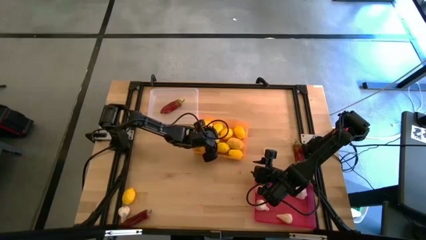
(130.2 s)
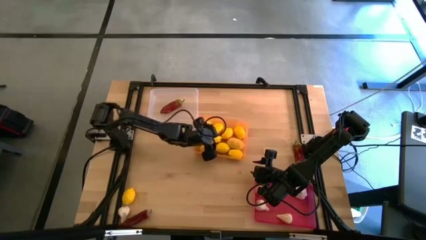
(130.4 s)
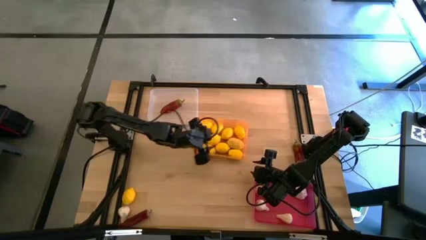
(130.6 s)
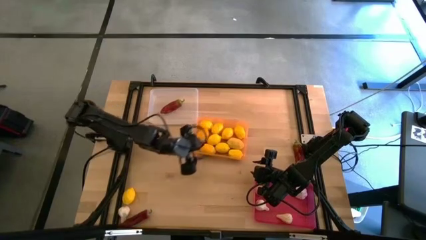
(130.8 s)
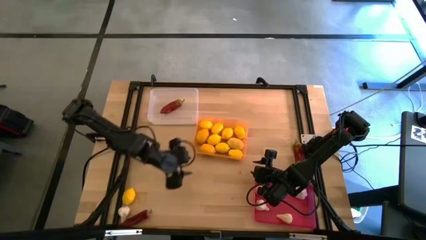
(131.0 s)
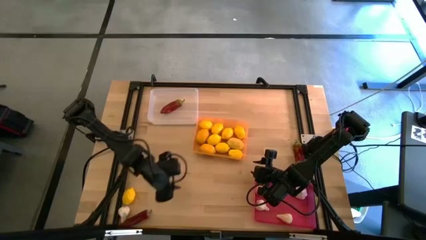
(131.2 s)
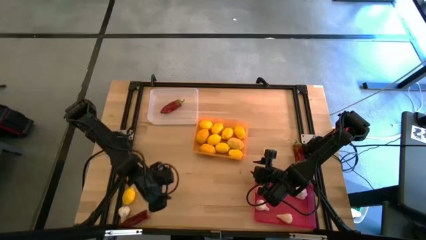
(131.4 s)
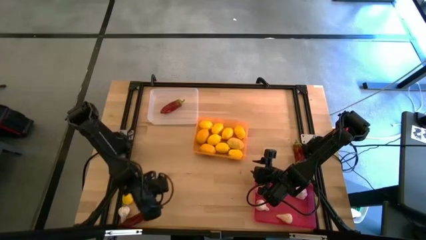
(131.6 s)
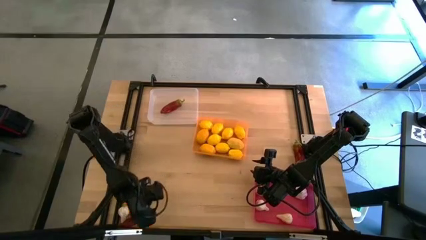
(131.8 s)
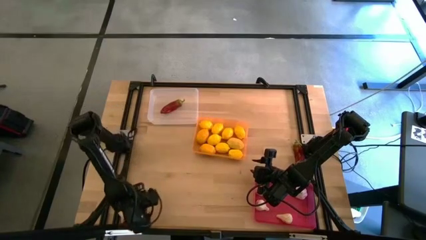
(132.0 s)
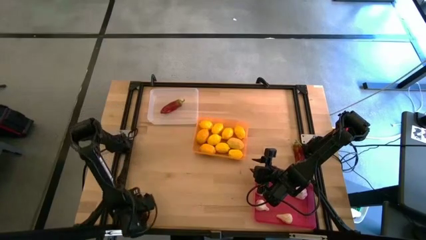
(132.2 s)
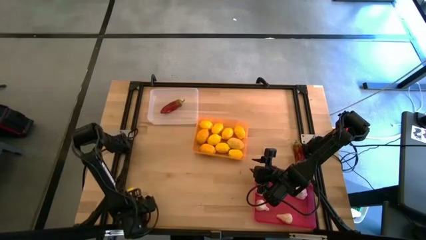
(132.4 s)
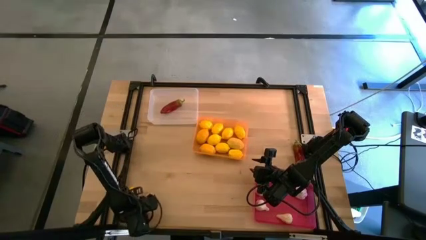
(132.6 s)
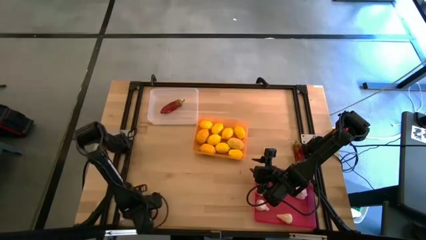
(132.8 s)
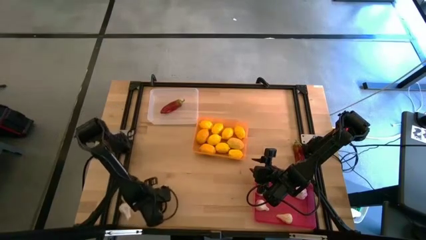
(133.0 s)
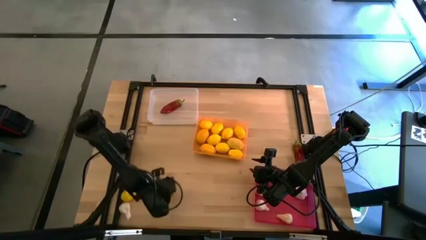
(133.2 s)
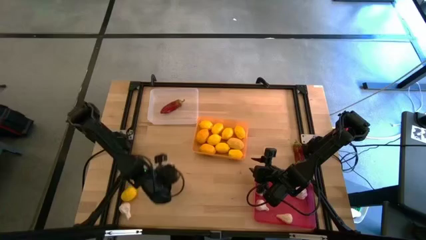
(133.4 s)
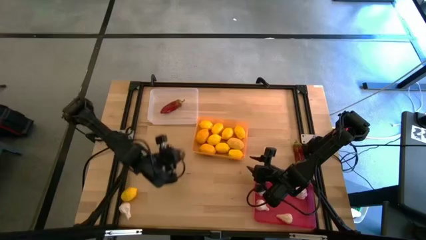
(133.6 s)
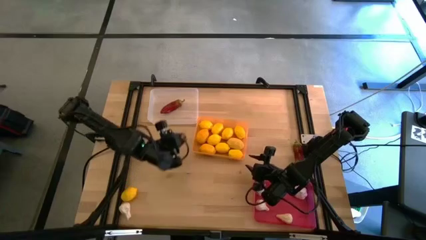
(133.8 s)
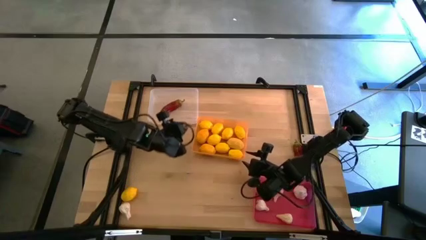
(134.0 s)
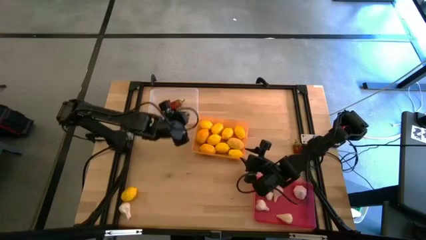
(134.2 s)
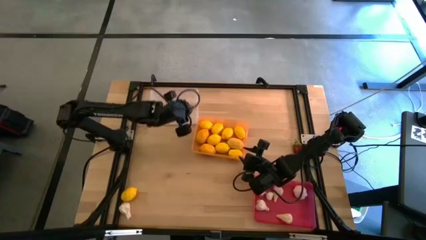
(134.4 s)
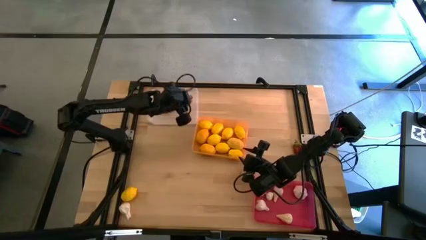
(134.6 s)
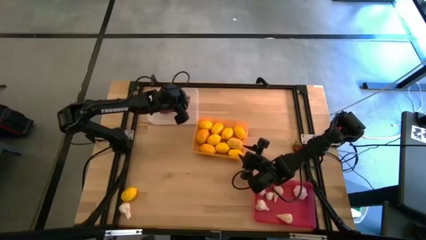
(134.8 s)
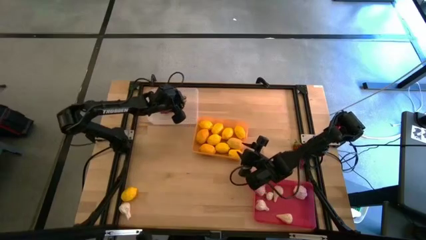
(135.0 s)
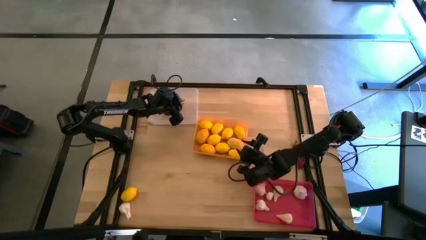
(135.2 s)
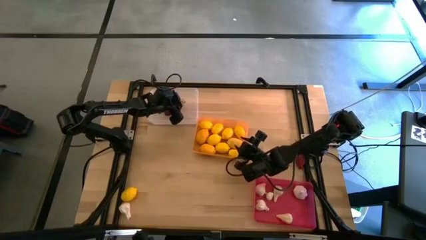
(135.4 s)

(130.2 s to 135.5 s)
Task: Sort produce into baskets
Put the red chili pepper into the white bin

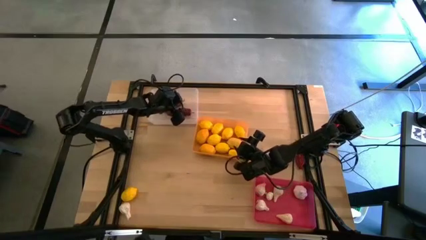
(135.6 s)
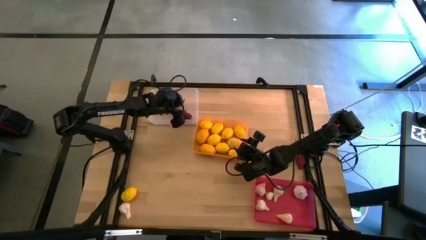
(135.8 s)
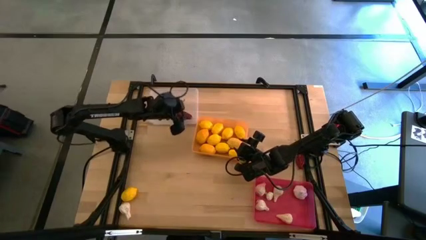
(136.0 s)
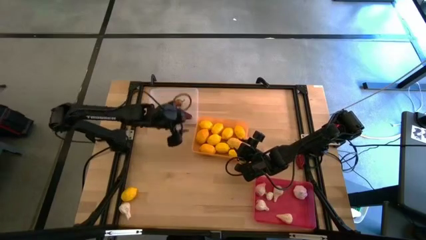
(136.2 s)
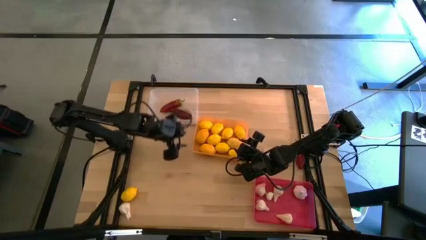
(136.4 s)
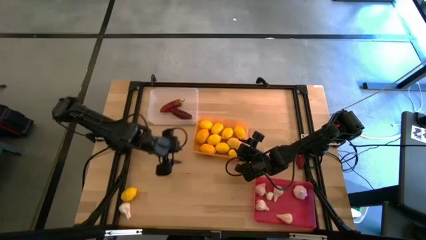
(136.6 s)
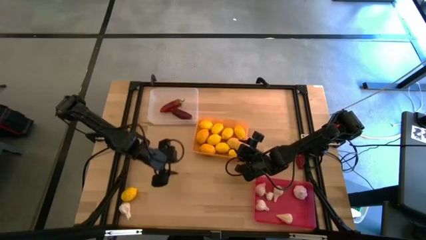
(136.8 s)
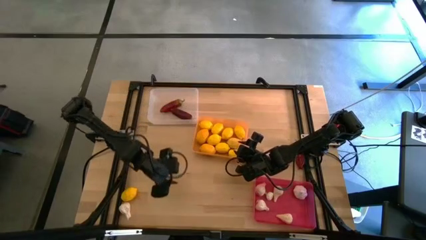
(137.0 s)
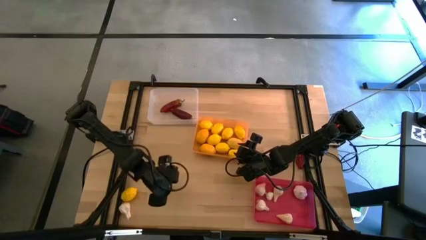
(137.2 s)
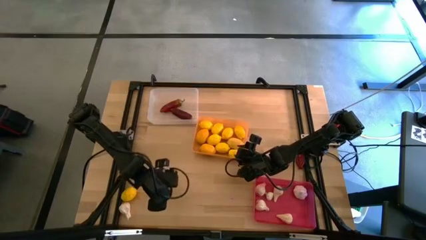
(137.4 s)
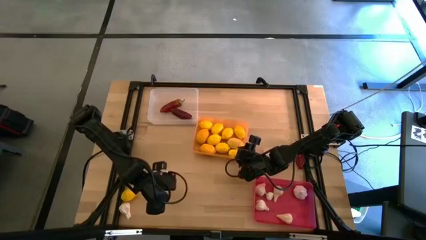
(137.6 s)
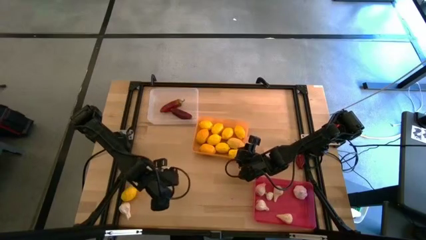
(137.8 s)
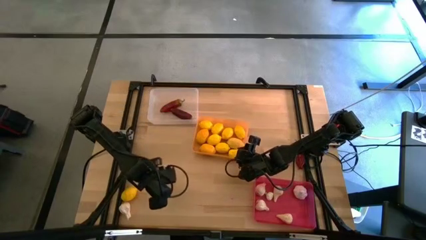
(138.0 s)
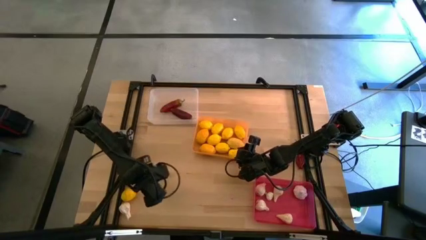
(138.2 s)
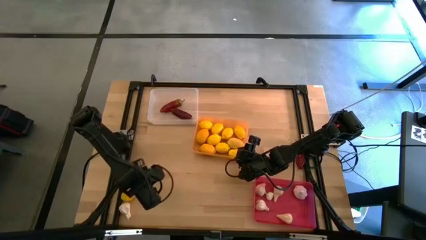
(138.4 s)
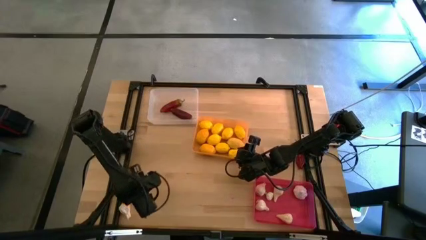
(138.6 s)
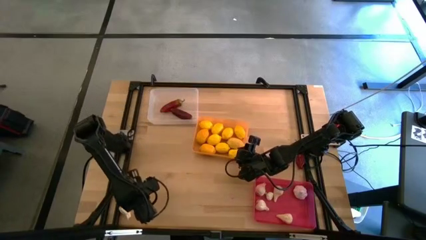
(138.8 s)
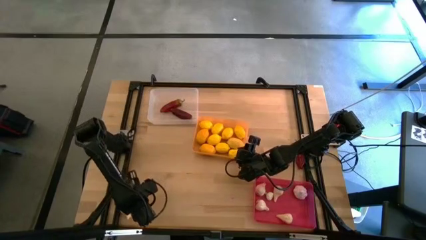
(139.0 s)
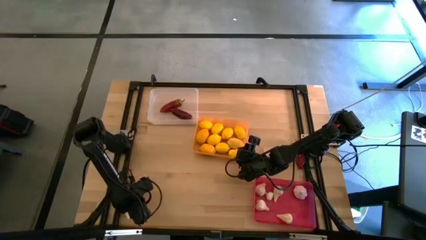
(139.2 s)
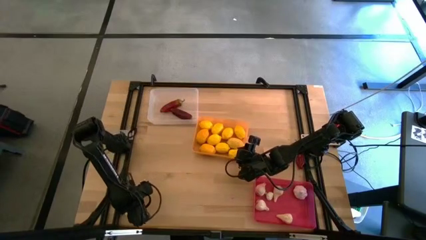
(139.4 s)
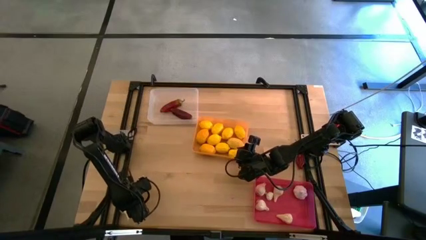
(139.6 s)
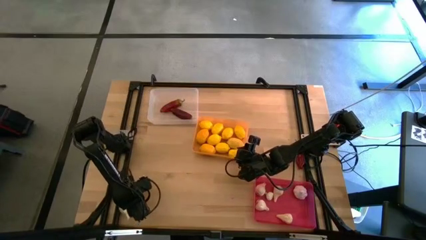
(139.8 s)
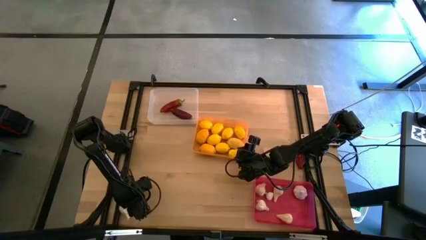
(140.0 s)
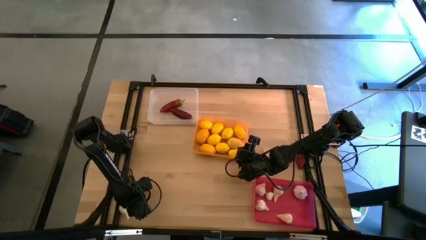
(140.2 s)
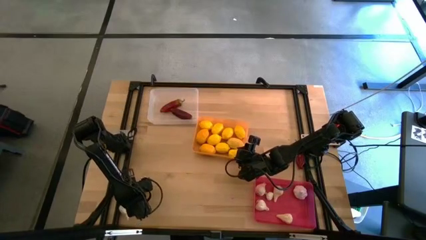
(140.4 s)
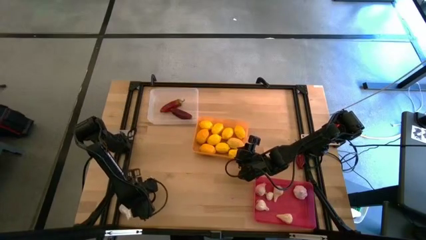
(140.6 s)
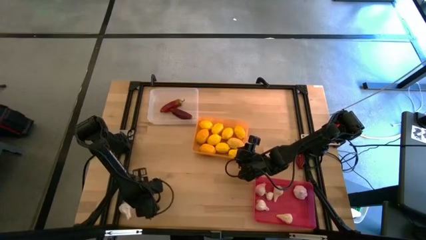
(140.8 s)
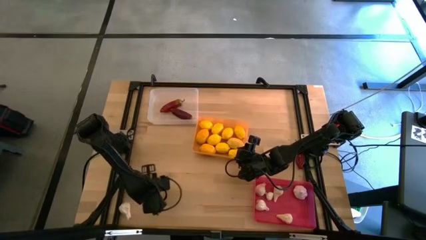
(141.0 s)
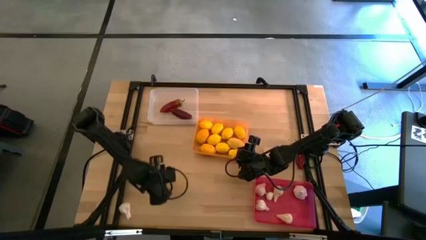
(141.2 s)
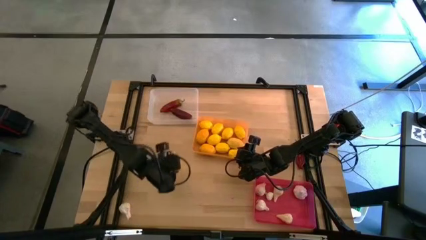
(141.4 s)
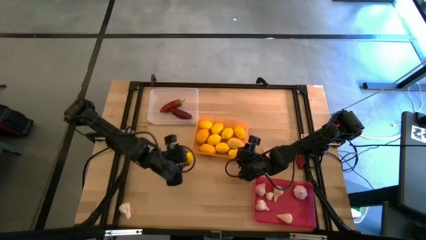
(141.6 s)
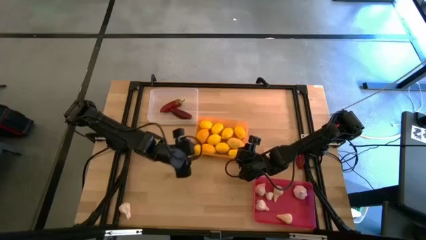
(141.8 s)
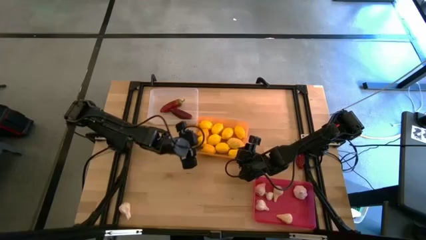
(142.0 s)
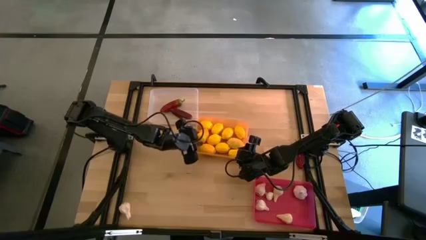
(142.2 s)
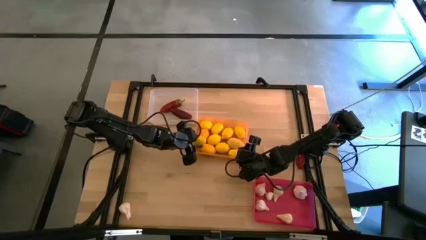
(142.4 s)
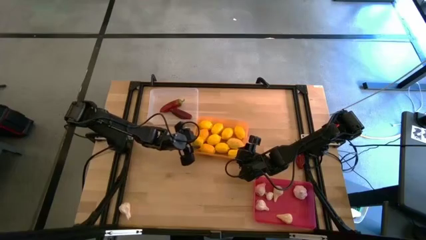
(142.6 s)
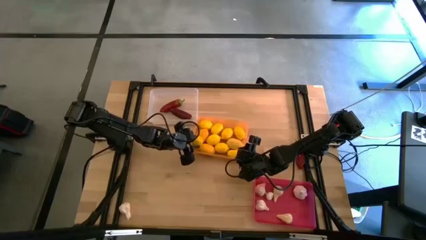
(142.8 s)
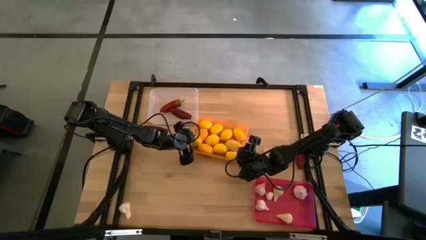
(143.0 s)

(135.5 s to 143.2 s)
Put the lemon into the orange bin
